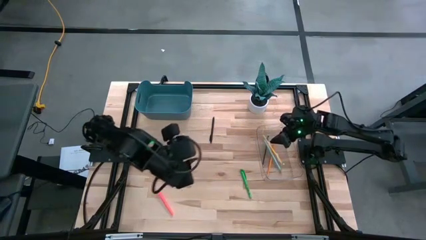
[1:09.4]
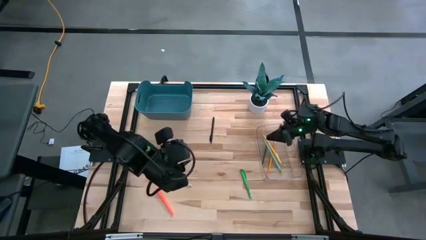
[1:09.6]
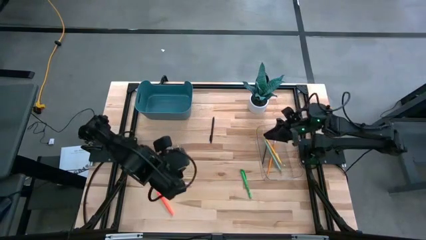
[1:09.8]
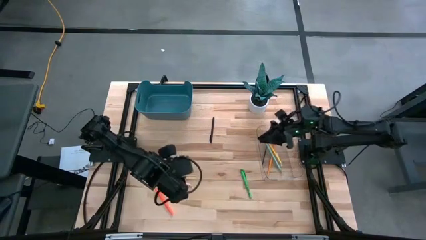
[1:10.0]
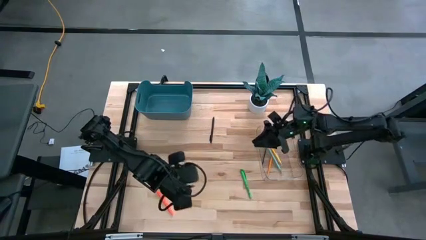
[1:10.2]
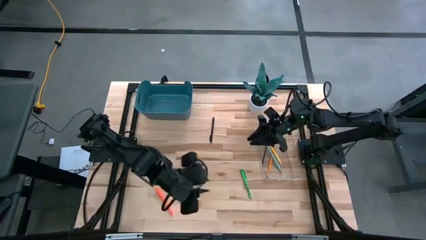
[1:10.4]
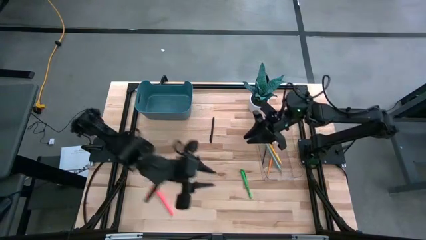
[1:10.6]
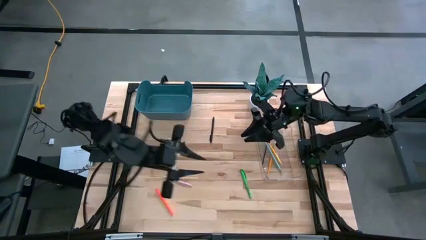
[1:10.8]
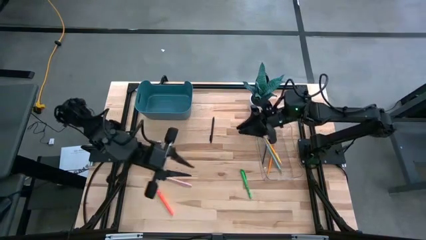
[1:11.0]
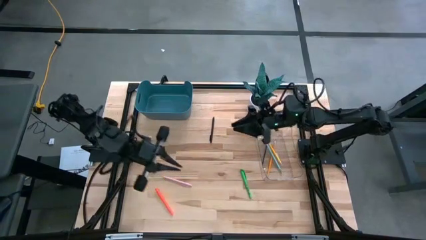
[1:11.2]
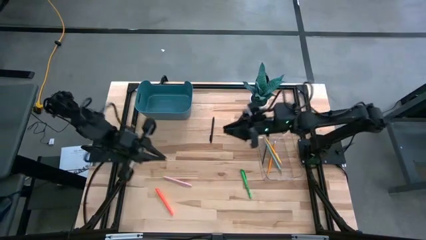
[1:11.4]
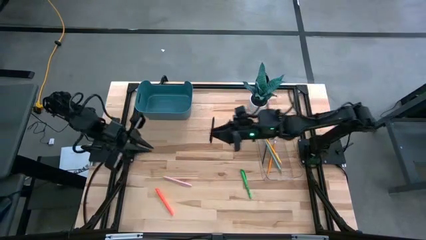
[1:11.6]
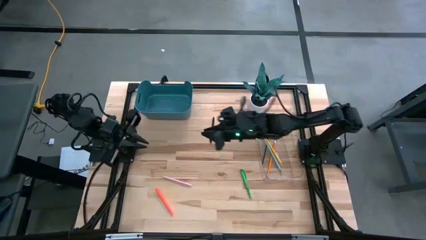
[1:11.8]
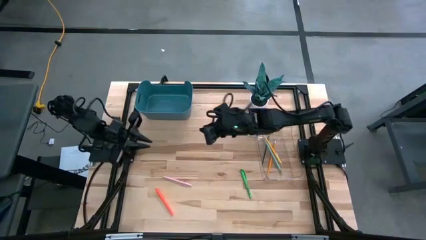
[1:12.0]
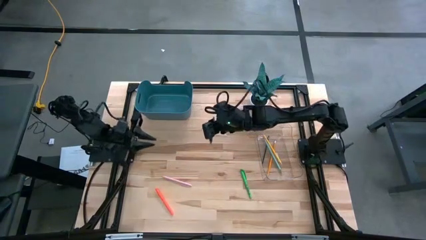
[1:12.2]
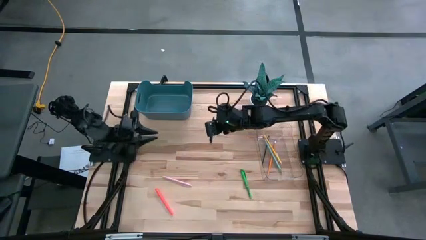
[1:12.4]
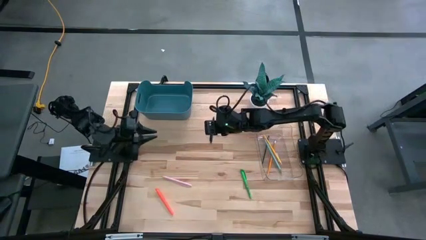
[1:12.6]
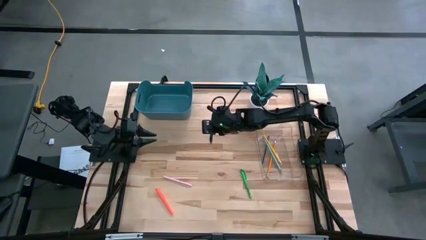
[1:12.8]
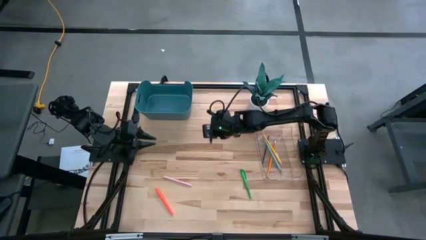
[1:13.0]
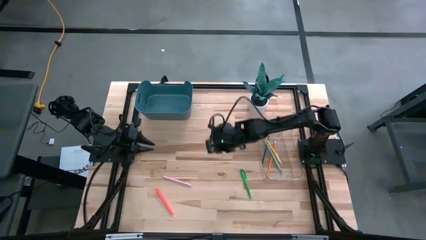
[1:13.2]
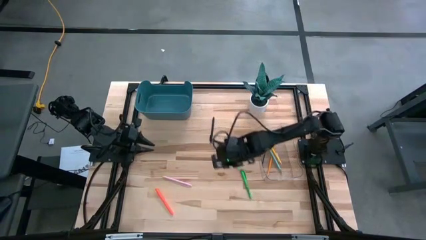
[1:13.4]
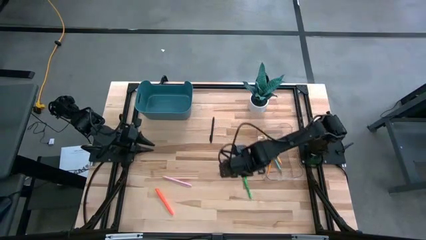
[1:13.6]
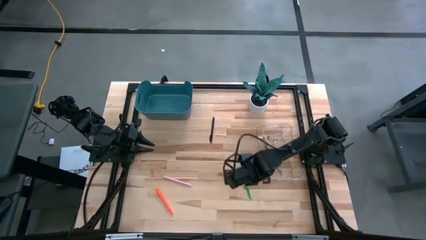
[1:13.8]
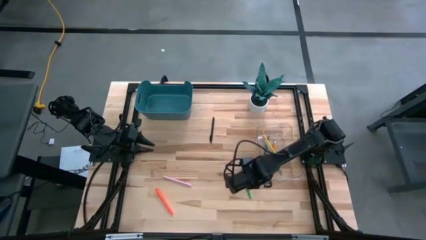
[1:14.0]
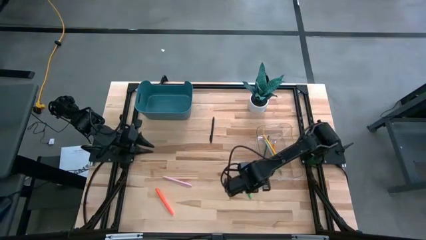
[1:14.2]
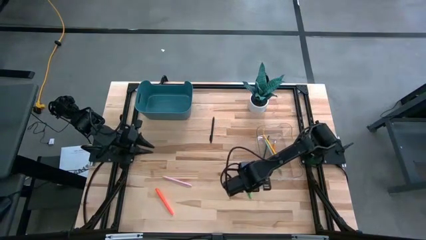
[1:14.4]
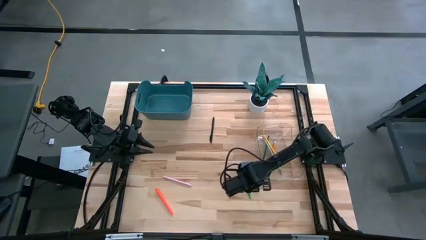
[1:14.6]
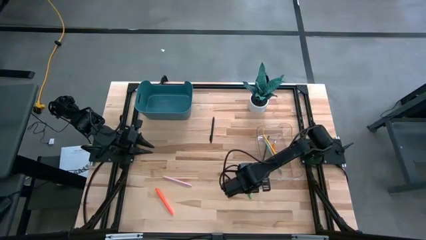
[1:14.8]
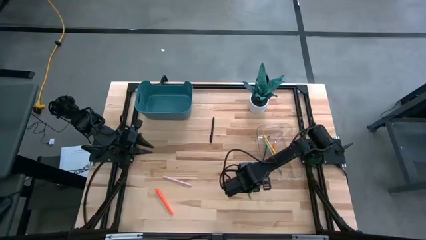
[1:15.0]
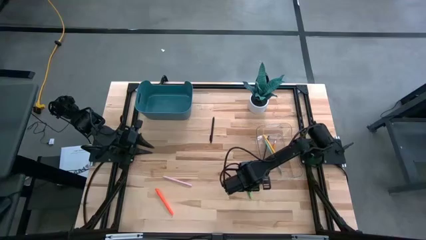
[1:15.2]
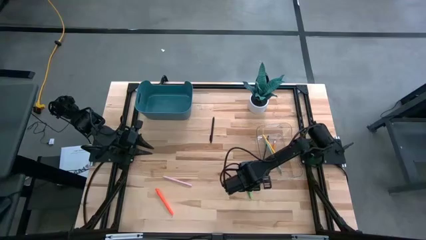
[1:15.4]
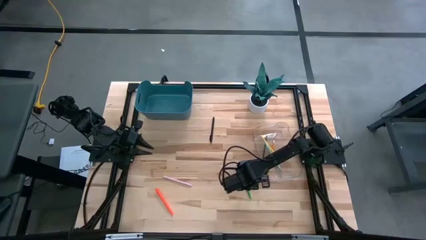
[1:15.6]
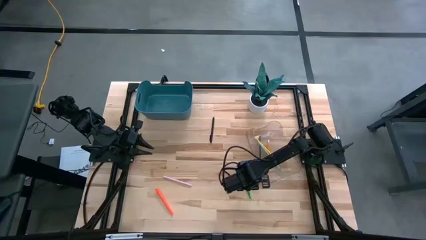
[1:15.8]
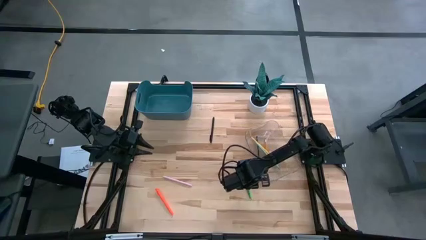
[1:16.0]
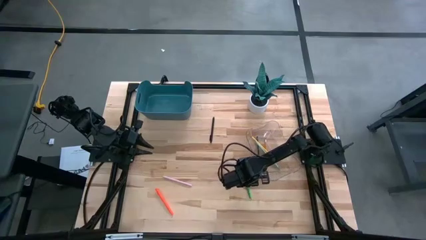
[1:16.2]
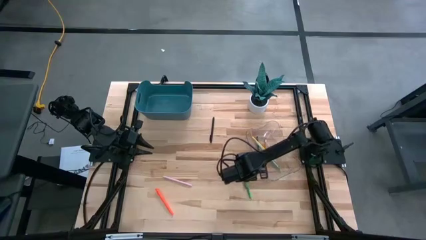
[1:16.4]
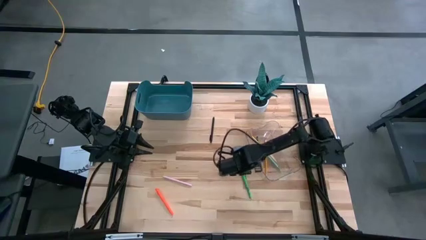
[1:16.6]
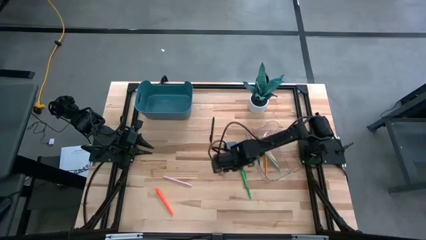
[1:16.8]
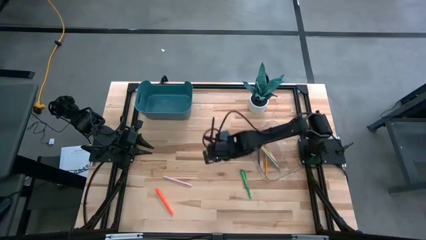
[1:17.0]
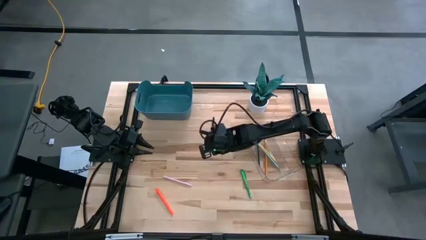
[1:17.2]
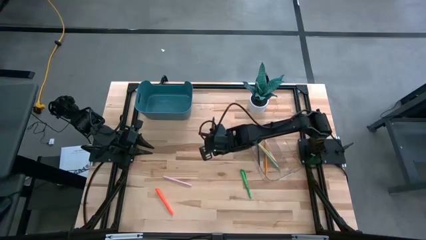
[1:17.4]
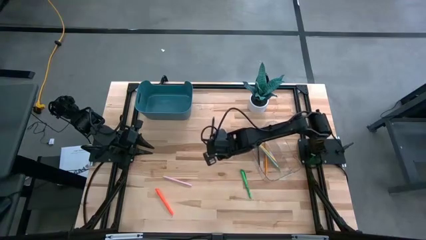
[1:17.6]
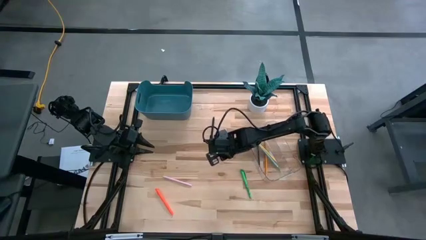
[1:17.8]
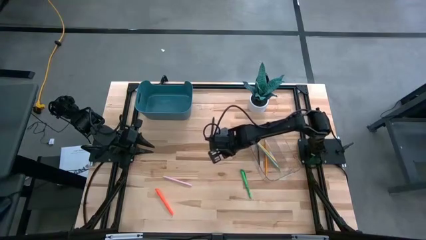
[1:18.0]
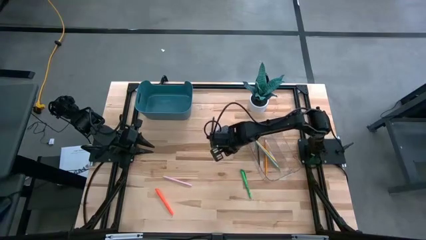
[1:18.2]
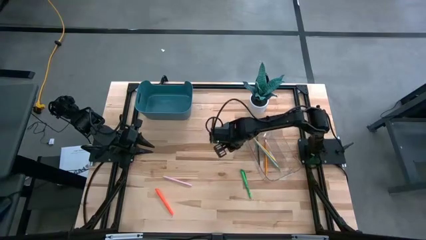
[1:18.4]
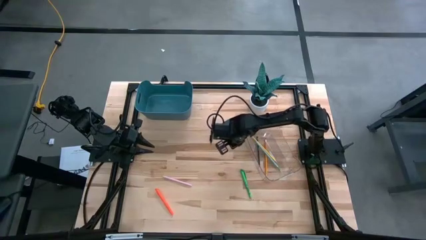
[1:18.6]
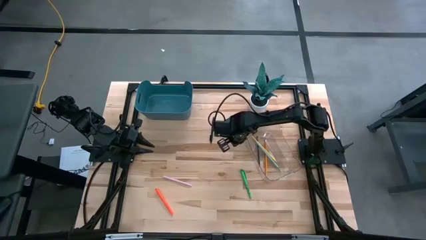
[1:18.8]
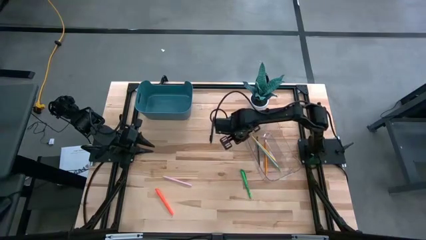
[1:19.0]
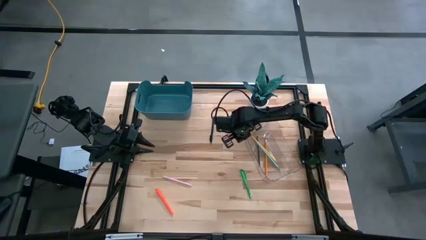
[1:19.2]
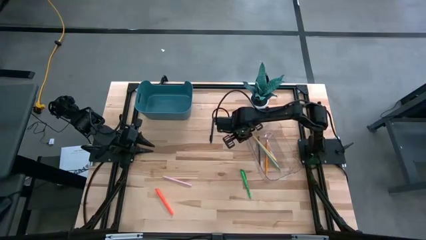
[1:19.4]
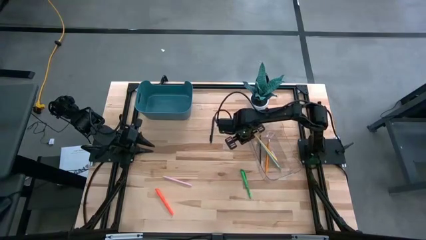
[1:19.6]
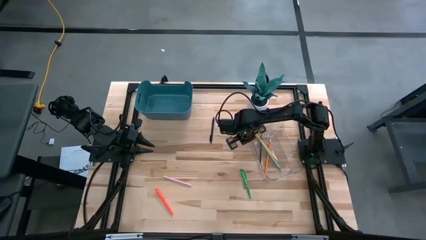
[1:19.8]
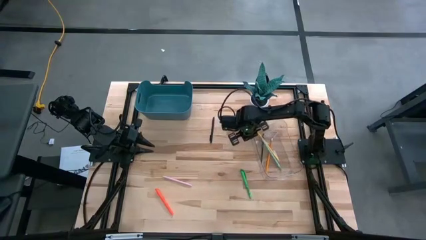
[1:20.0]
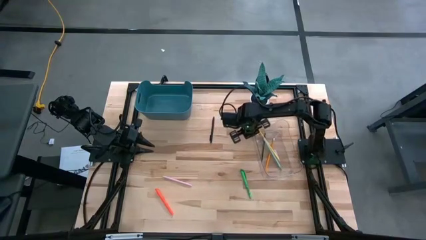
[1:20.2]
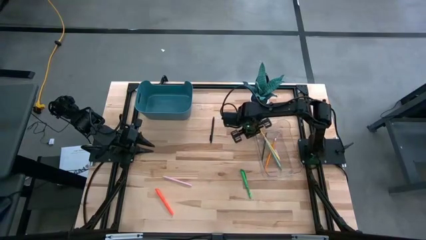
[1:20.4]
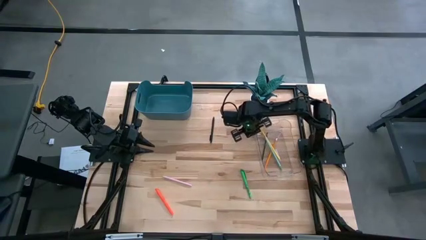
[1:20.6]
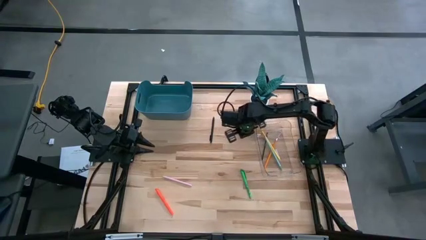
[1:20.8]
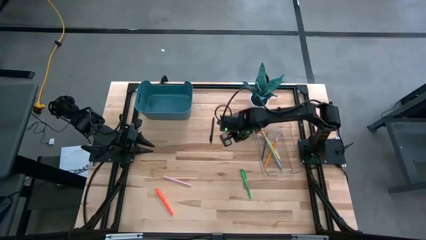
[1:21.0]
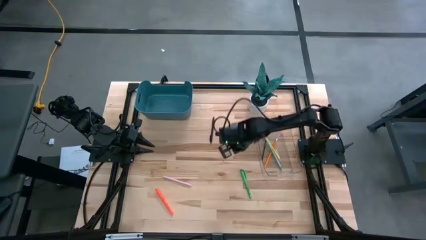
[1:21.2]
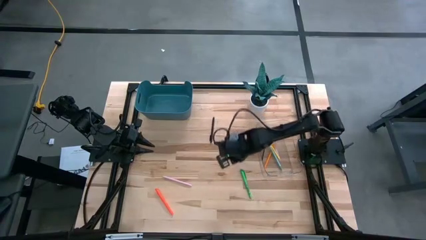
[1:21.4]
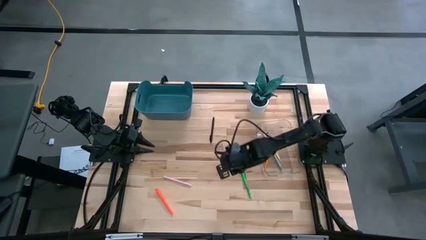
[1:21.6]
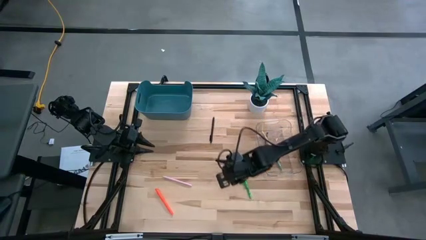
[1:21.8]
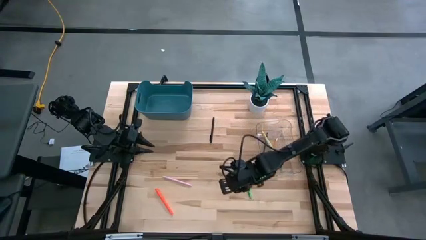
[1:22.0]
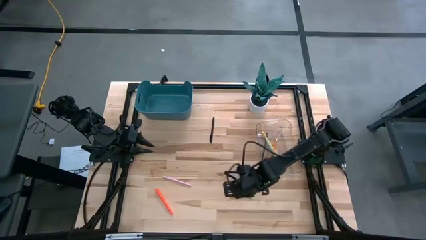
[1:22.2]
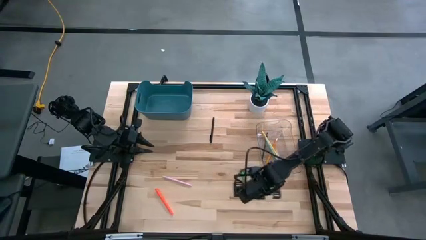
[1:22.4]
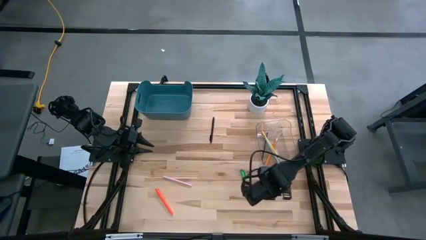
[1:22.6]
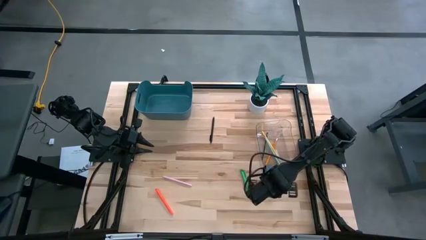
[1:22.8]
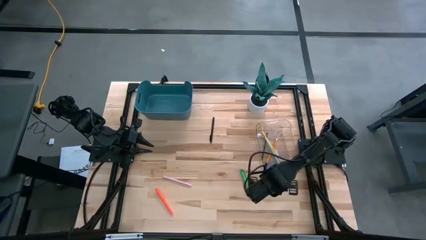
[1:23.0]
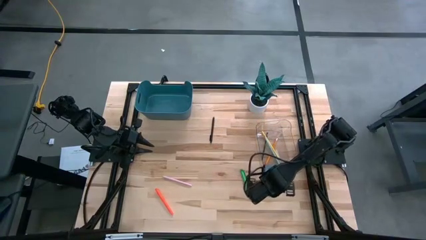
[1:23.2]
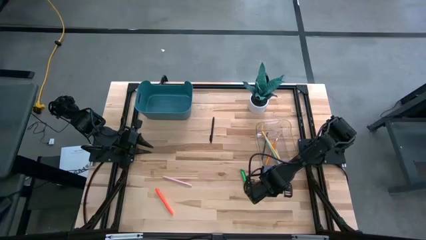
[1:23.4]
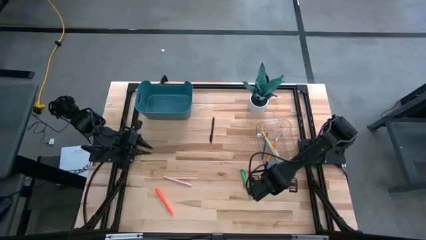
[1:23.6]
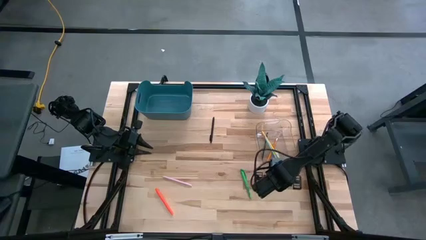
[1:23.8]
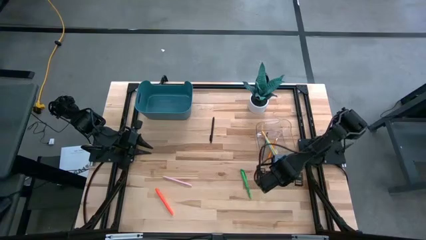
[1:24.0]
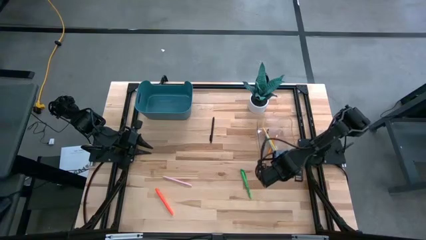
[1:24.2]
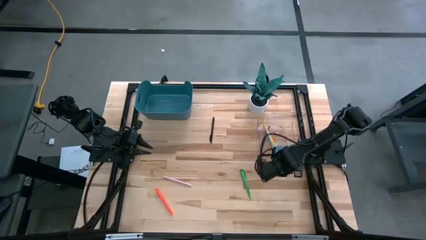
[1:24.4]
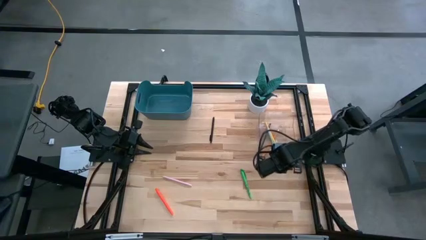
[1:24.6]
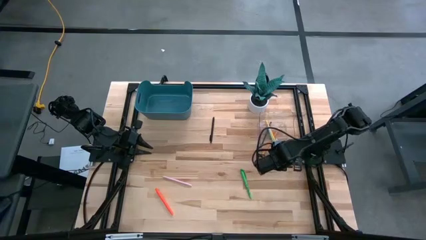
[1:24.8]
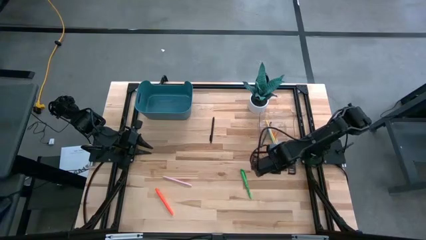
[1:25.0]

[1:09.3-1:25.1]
Task: Sort pens & pencils
Adjust the transparent bin on the table

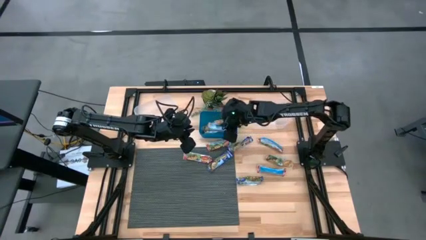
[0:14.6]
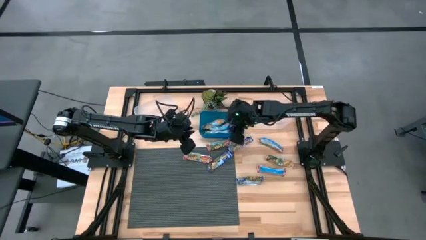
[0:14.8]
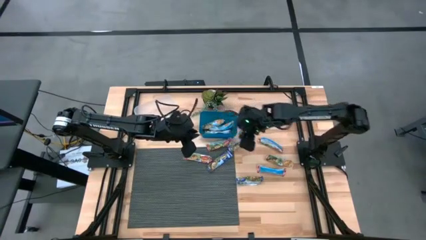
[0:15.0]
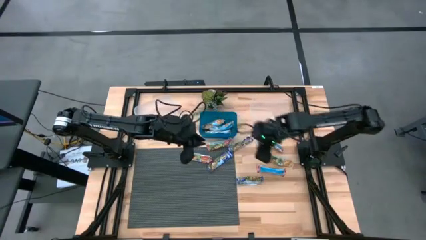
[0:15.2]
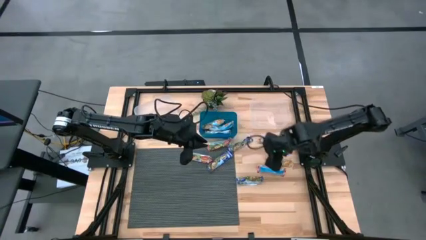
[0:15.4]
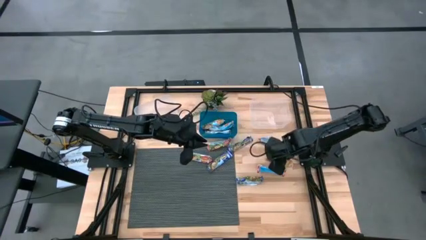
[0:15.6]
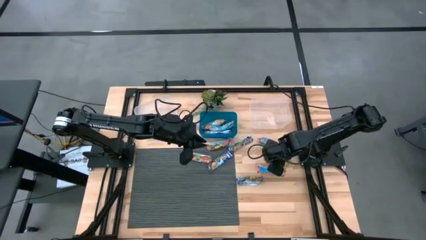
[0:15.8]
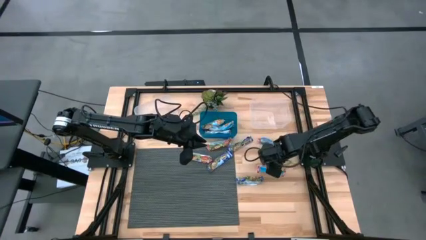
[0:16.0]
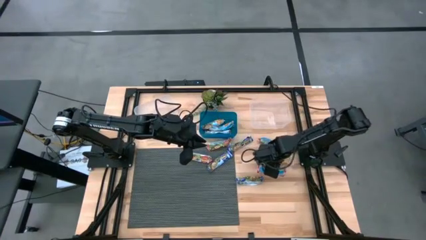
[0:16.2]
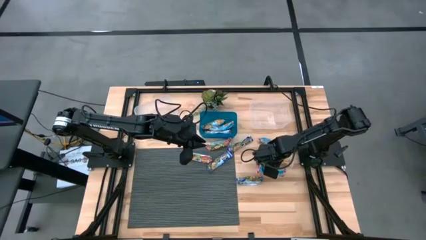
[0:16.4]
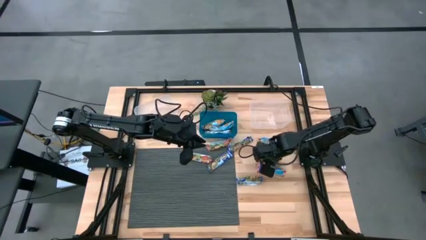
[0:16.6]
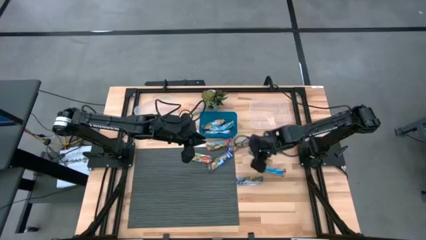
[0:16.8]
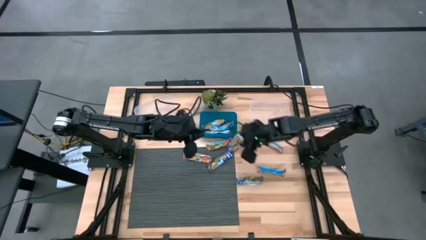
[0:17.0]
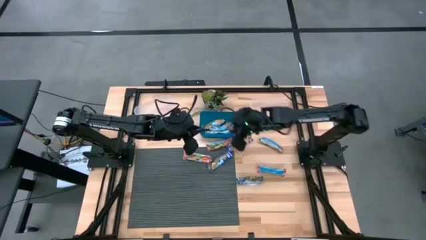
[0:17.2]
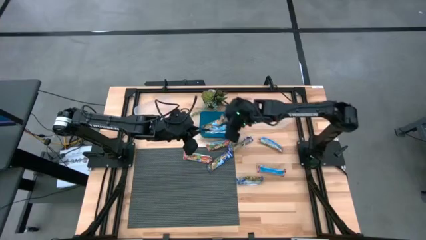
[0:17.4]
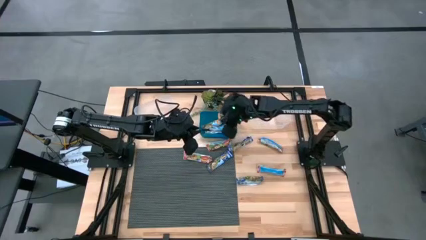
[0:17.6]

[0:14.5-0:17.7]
Task: Pick and place Granola Bars by type
Put the yellow granola bar into the blue bin
